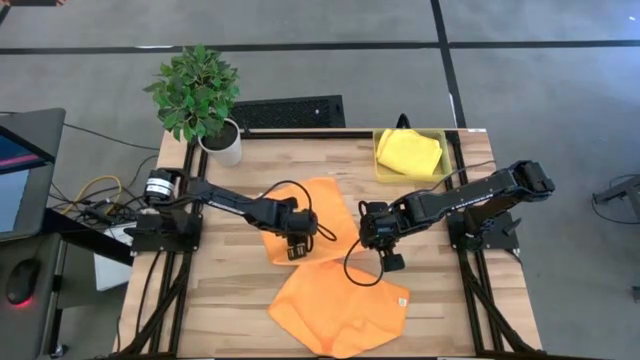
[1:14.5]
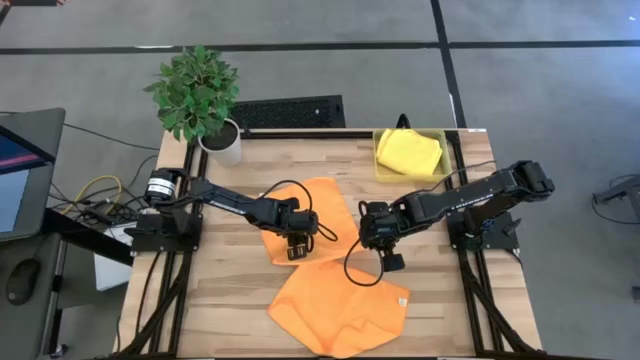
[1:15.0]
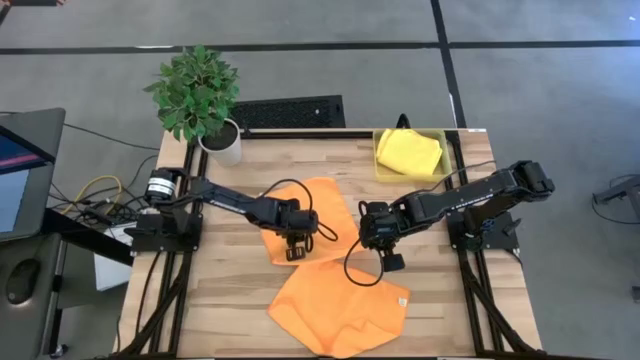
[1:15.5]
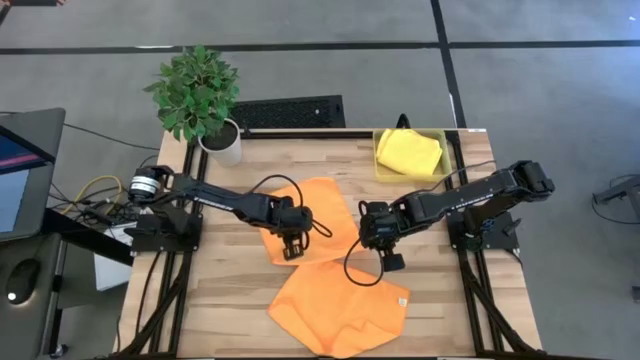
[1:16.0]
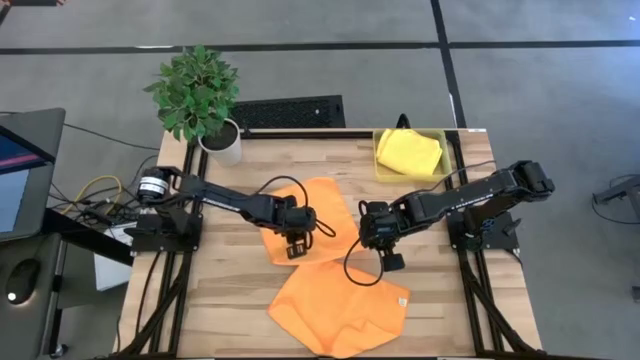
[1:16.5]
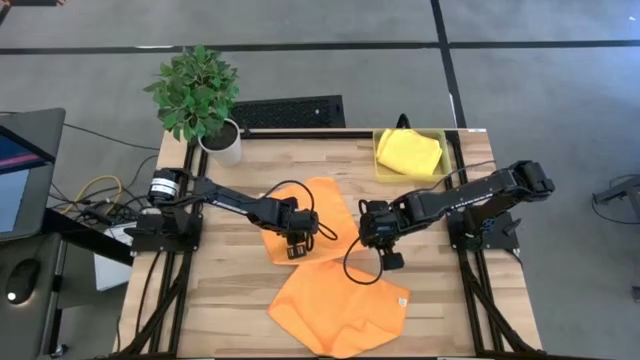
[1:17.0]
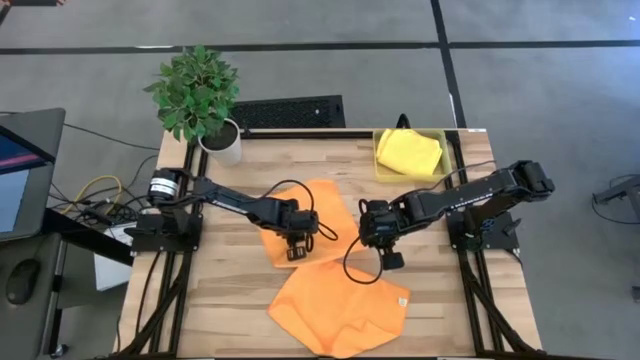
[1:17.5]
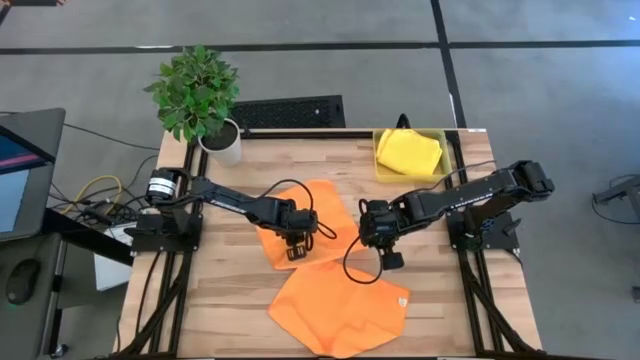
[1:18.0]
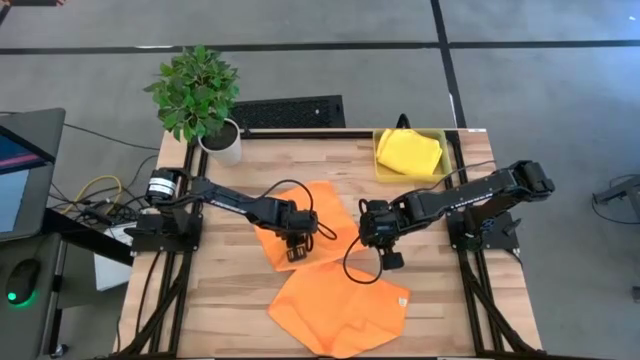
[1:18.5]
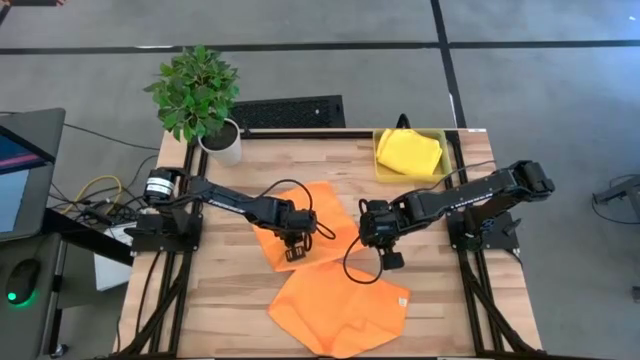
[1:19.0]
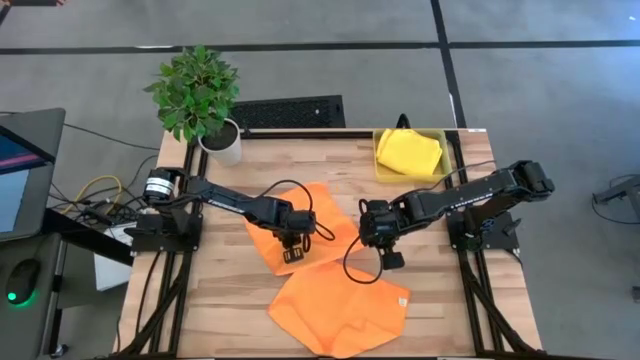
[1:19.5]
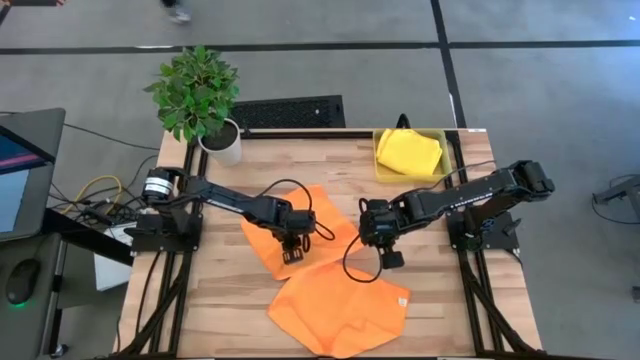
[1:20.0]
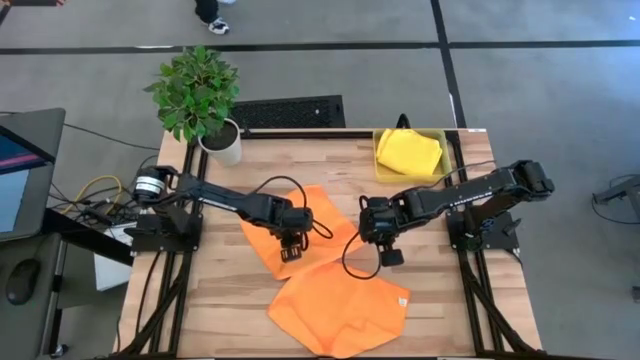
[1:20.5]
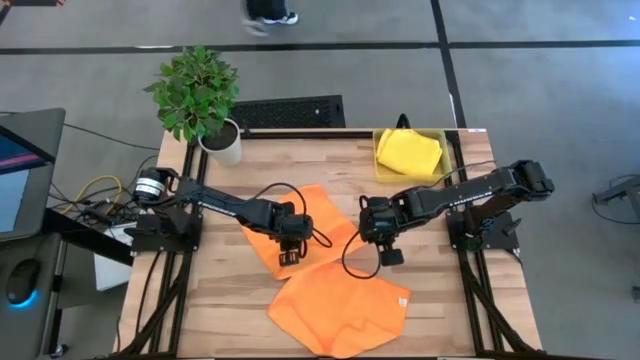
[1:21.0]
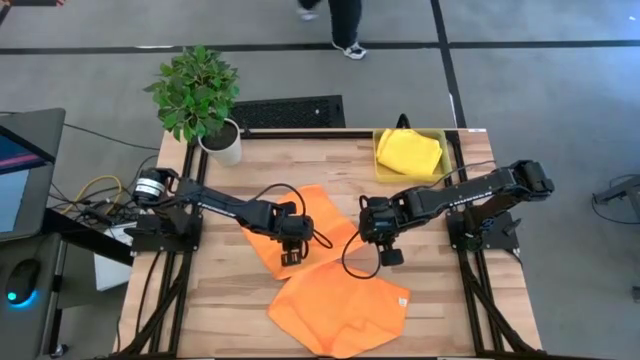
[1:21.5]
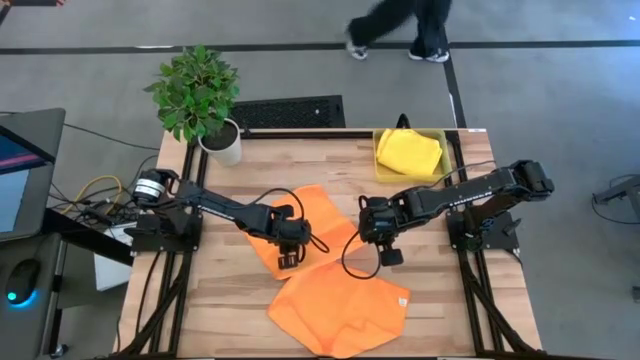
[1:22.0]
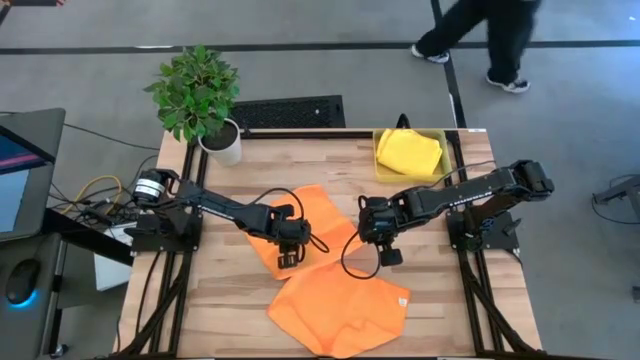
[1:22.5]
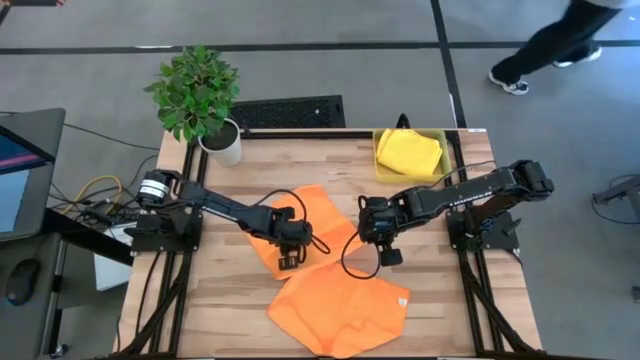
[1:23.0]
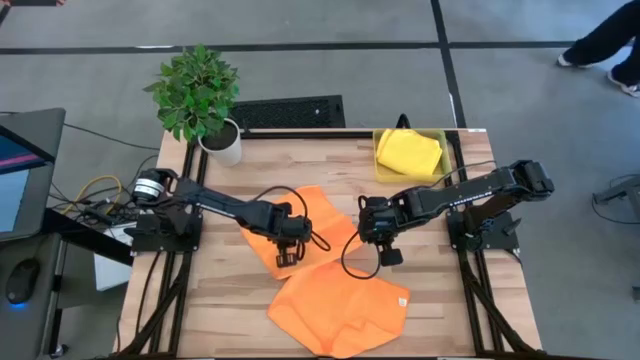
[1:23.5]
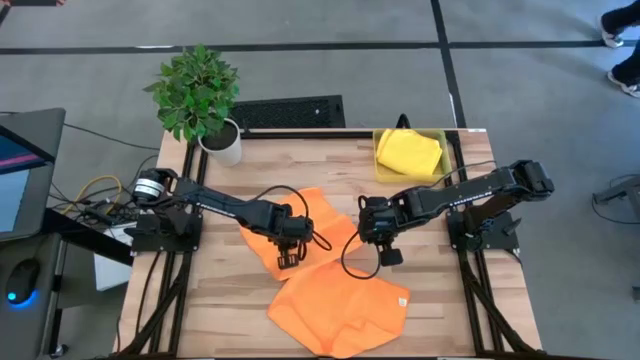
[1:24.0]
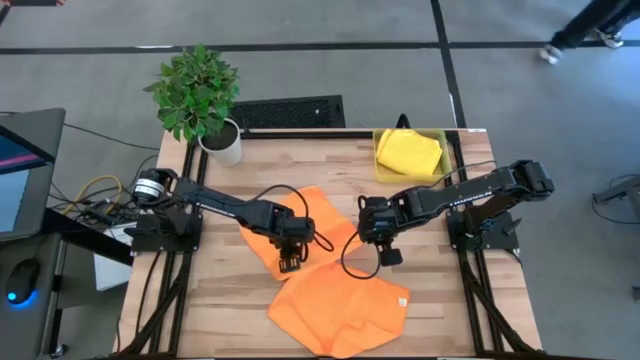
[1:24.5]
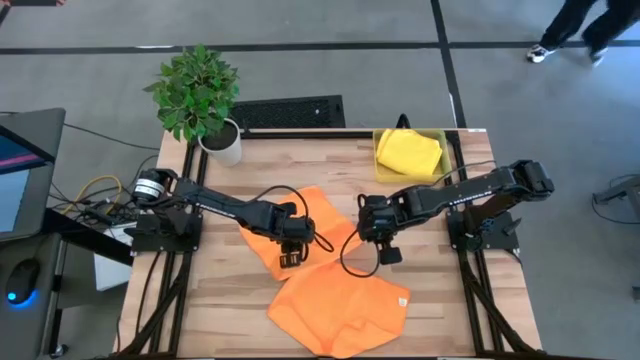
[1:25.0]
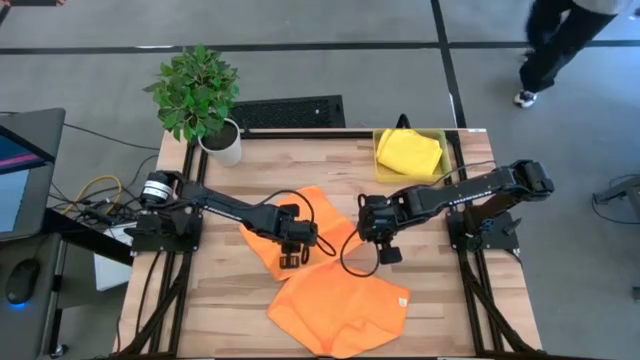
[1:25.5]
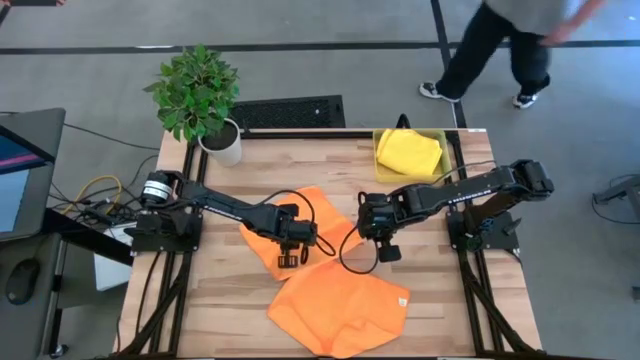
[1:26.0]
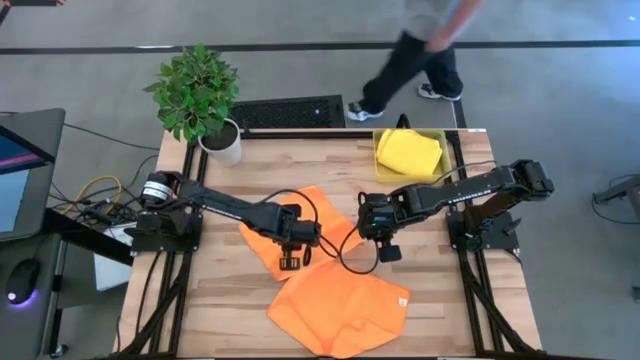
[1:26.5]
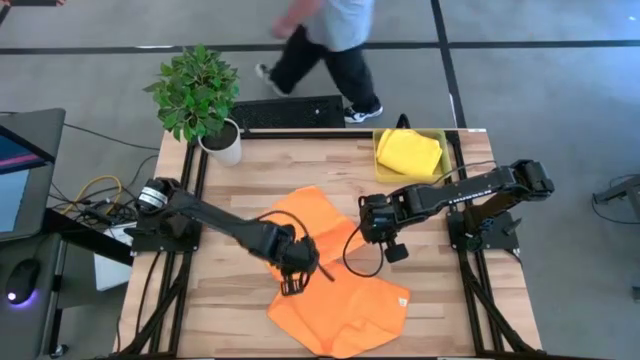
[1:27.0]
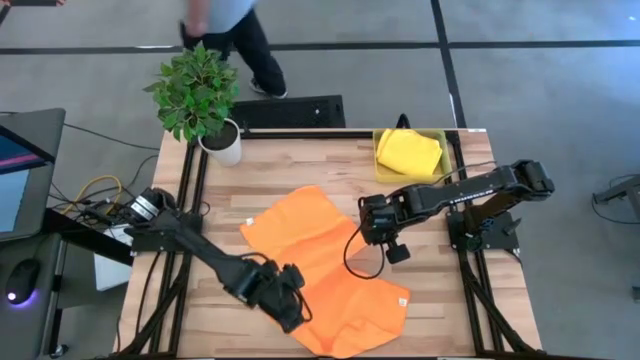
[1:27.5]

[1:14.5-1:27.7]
Task: Fold microfiber towels
Fold the top orange microfiber towel

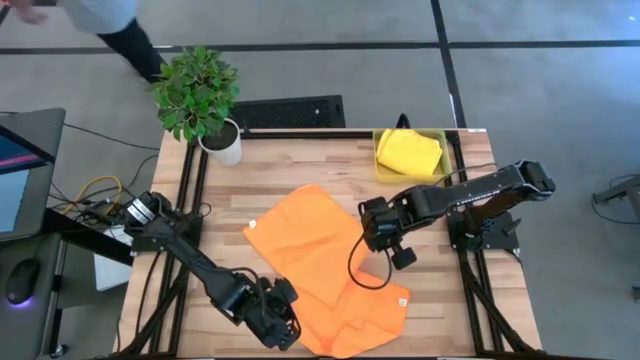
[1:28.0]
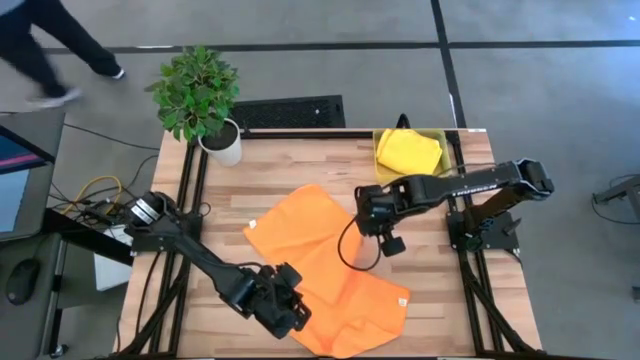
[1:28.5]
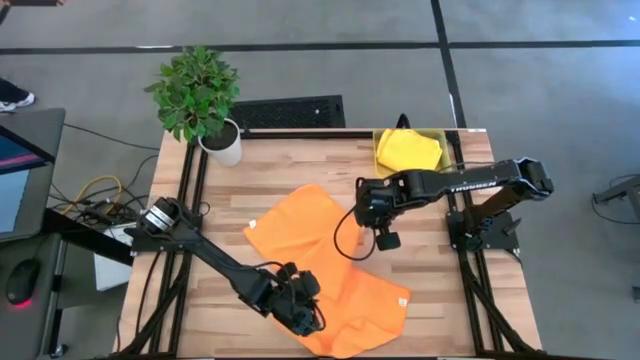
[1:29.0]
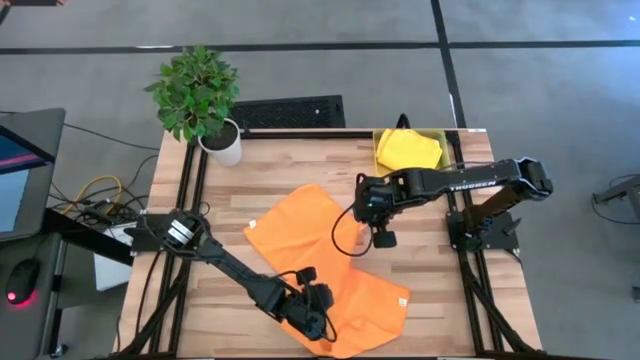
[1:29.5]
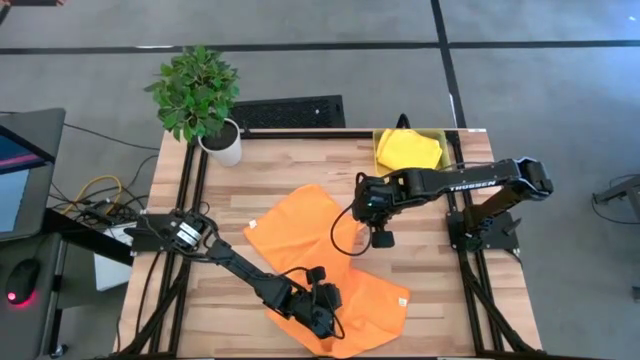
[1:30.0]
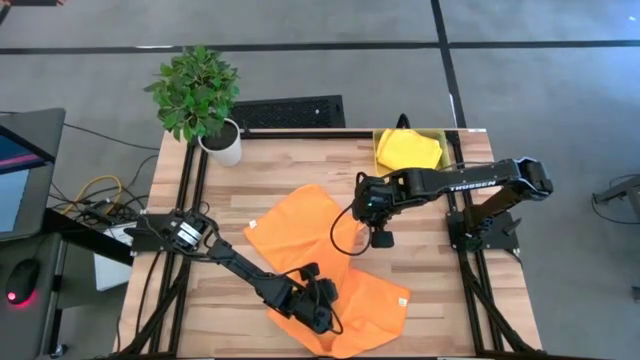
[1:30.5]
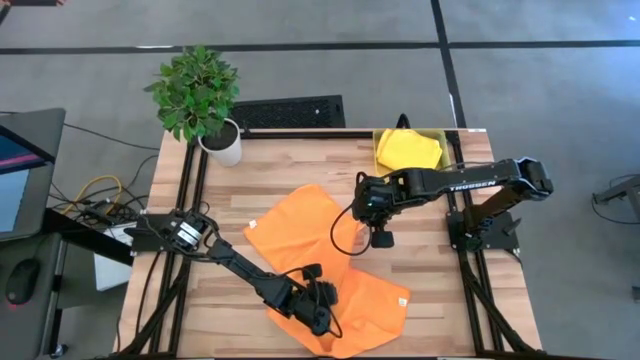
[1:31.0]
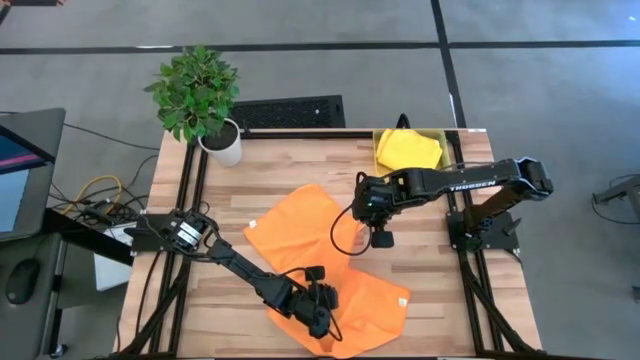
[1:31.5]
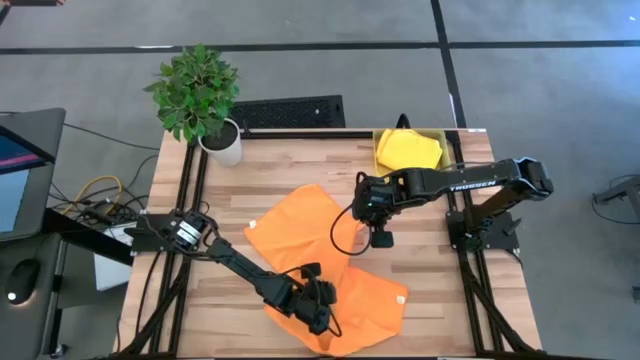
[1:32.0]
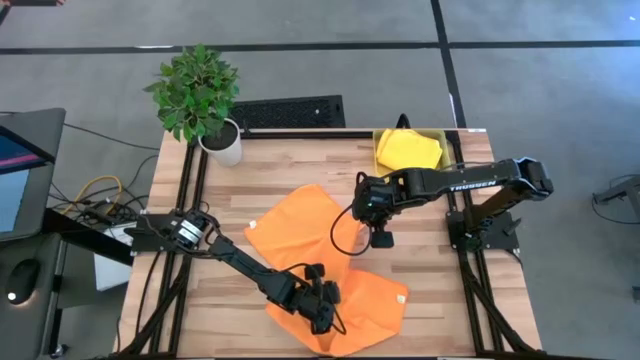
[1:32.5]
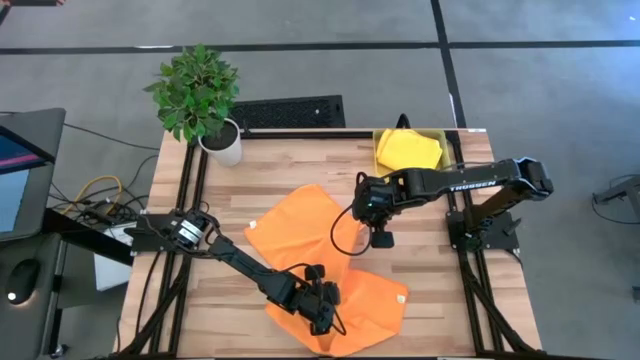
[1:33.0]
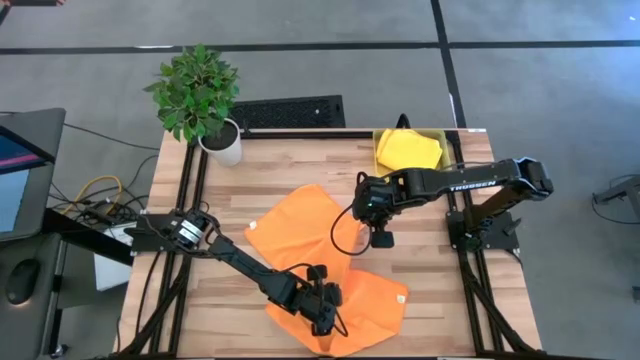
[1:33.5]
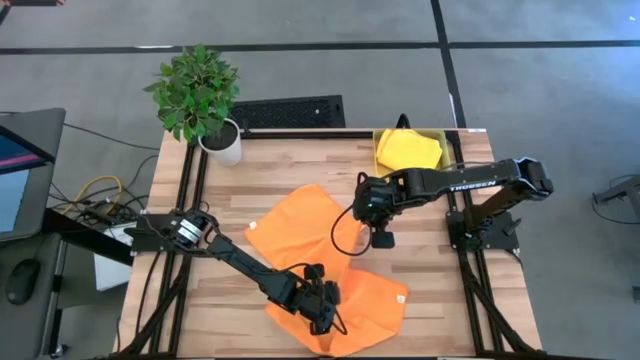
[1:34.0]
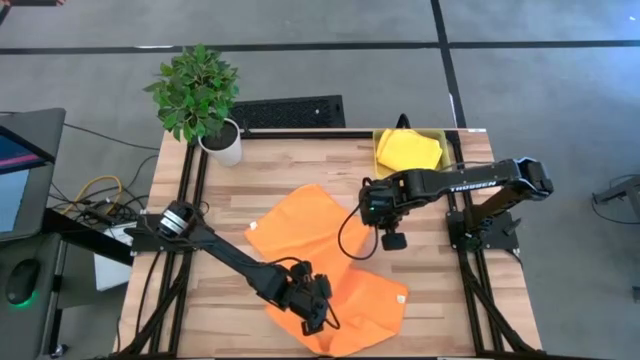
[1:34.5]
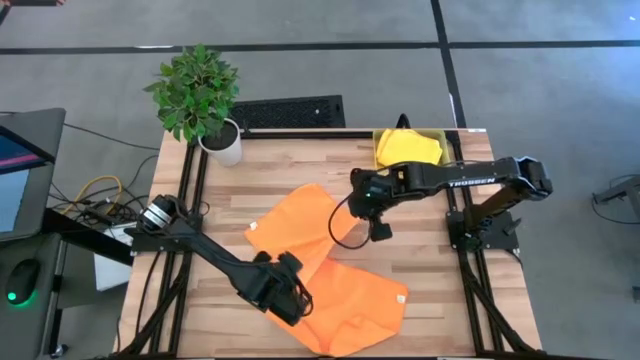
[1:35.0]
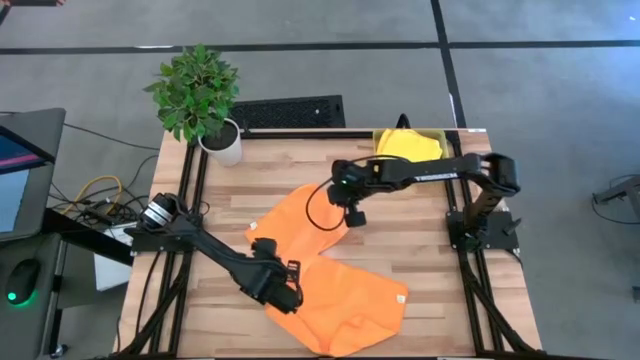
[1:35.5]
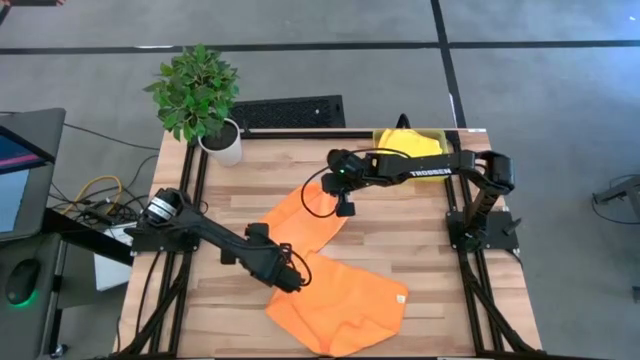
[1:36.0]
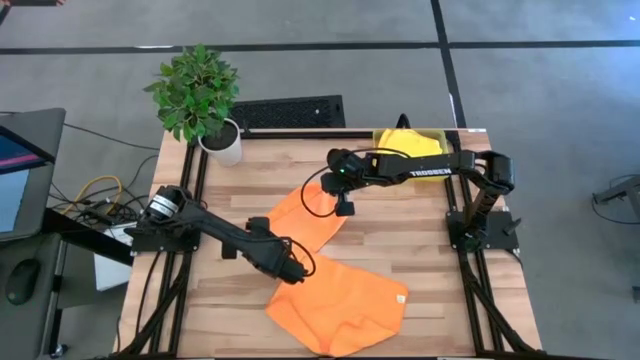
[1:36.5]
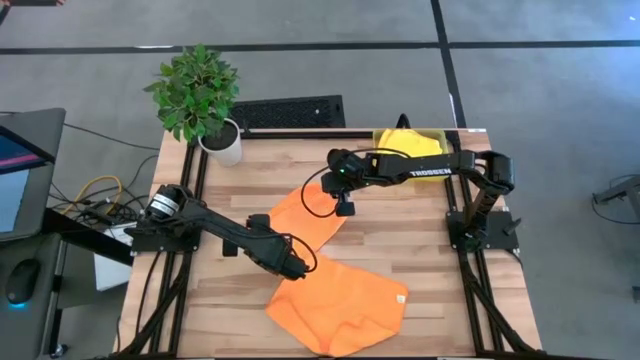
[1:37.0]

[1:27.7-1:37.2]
Fold the top orange microfiber towel
